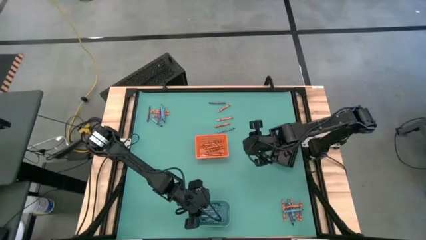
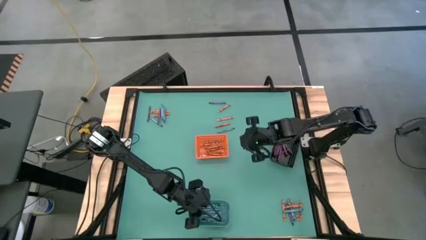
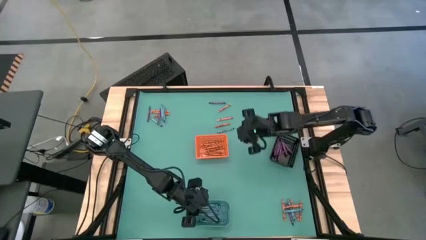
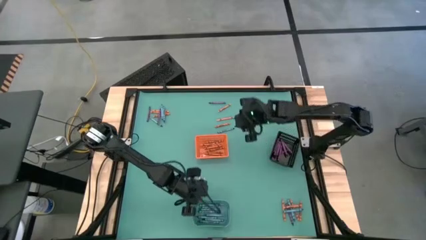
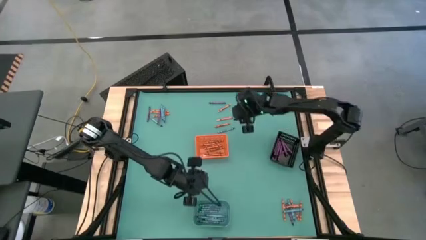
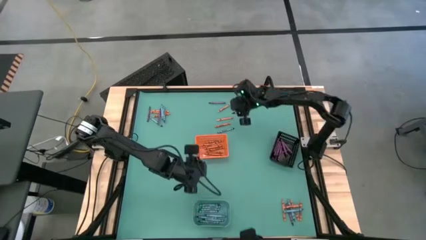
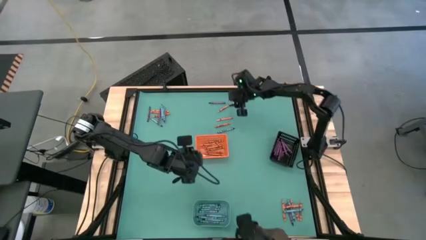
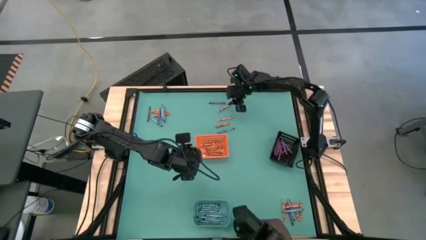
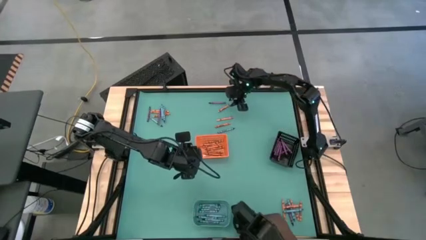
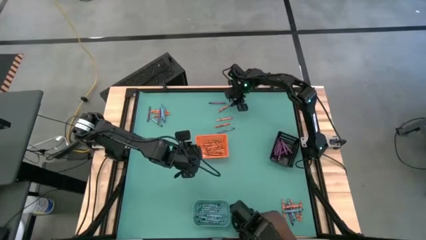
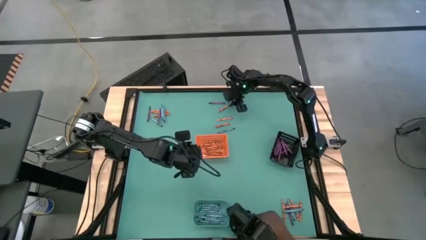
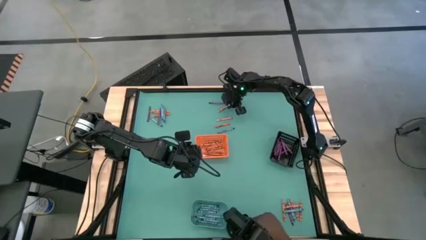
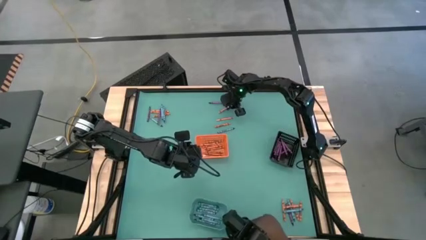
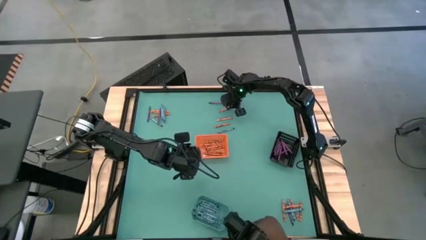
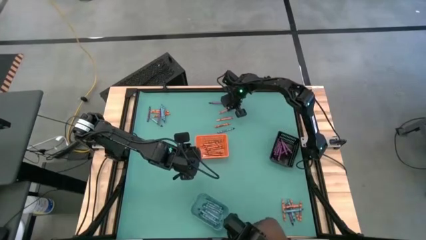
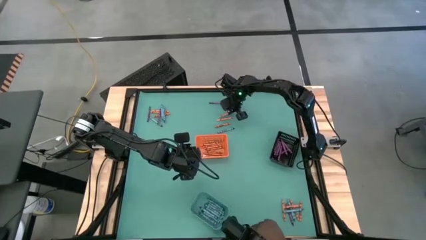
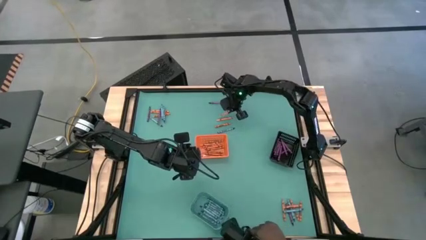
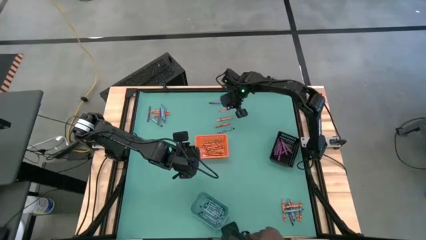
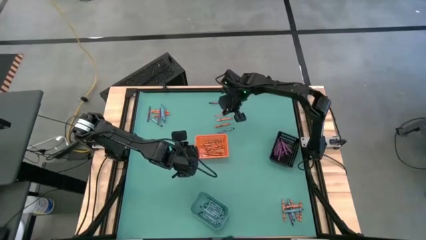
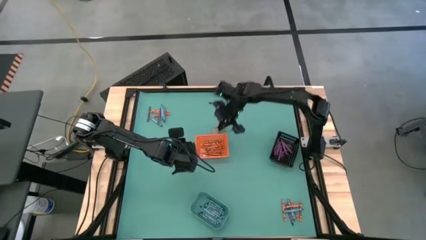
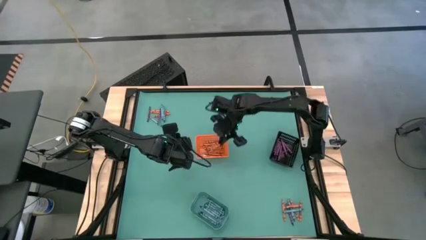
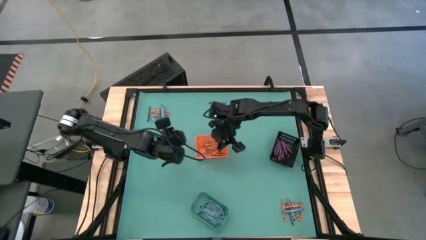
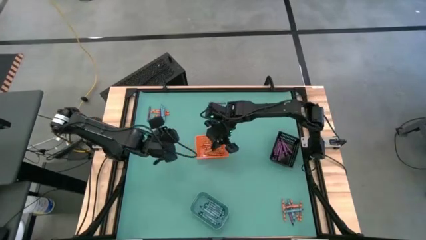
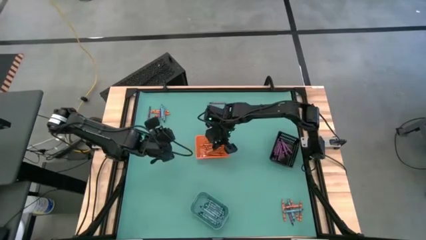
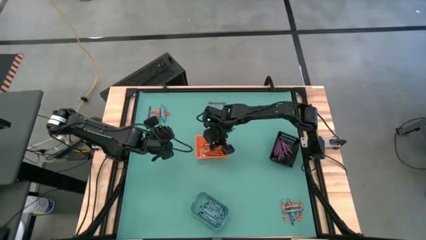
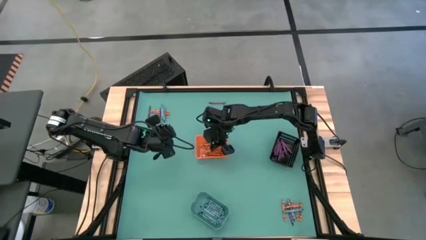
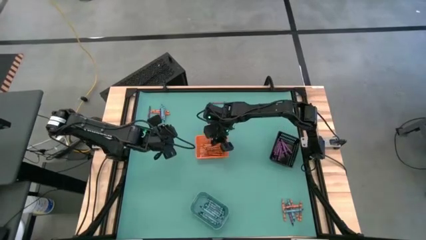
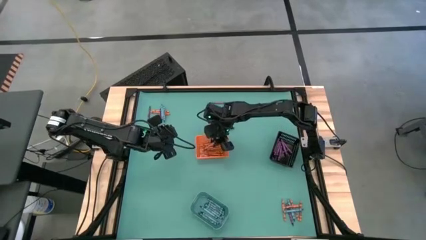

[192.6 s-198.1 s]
Task: Sort crayons
Put the orange crayon into the orange bin

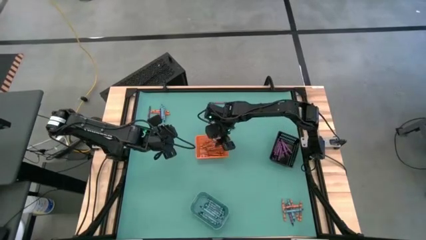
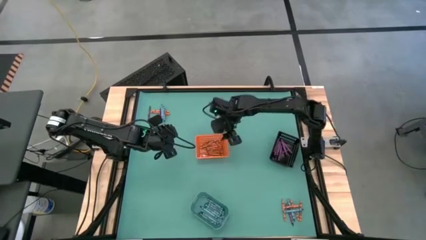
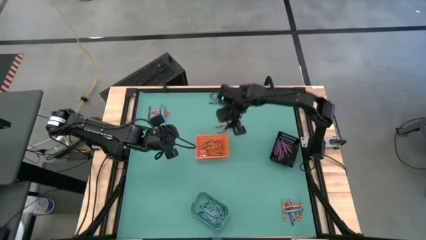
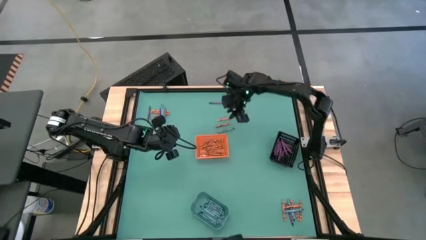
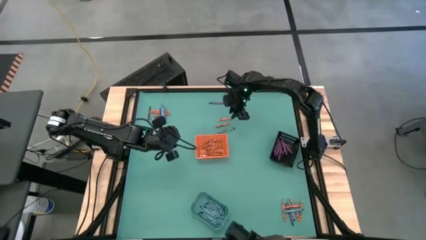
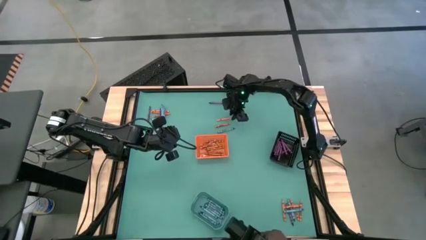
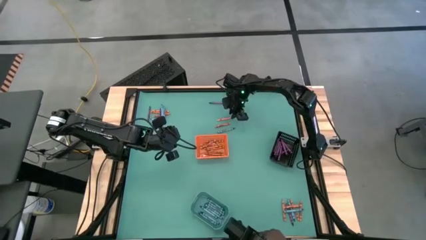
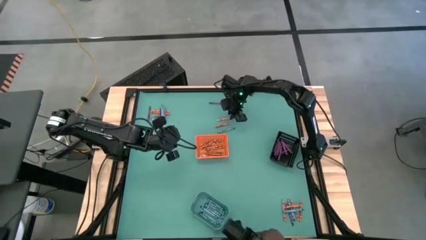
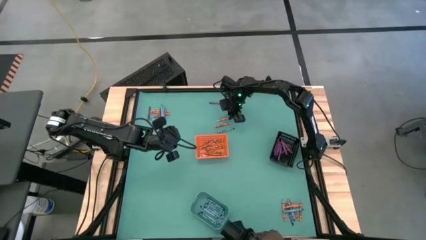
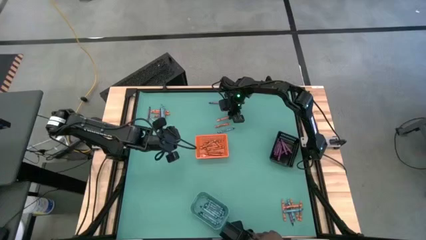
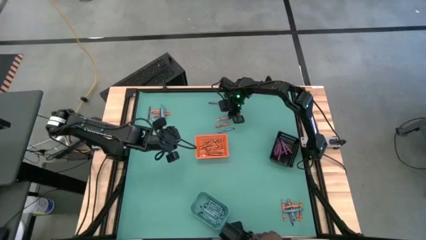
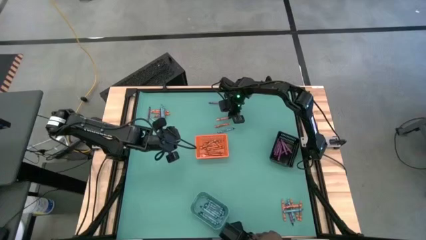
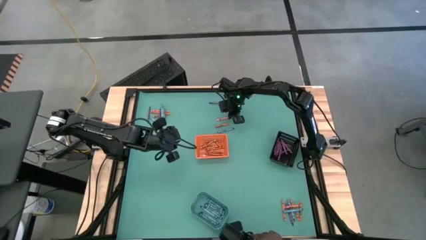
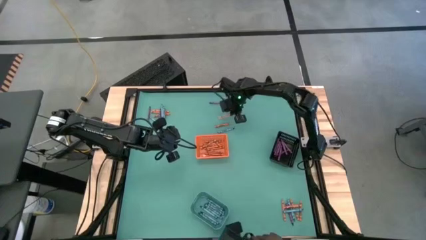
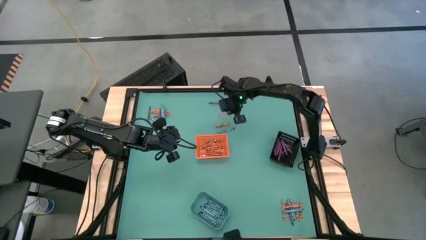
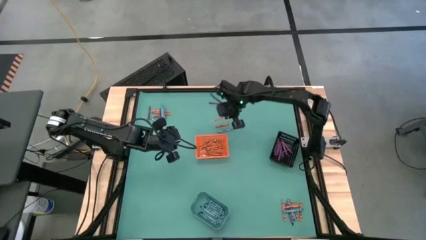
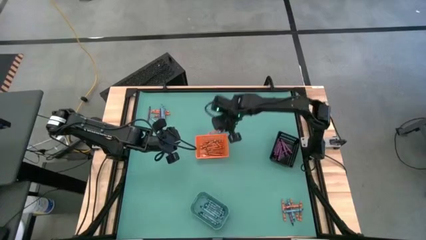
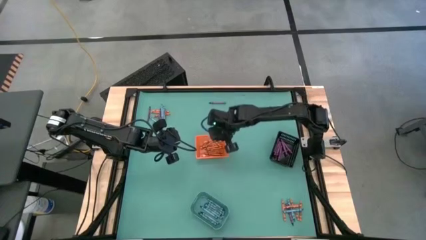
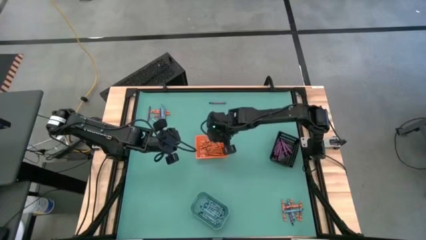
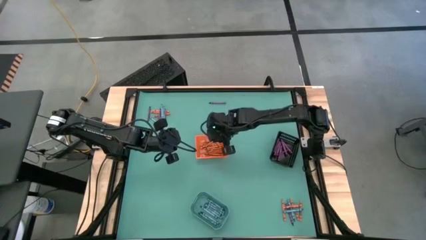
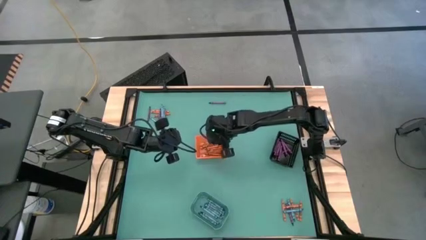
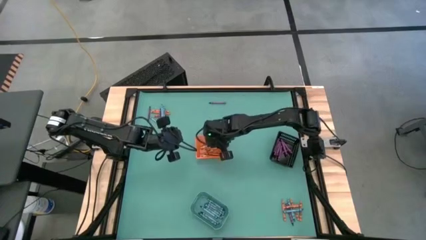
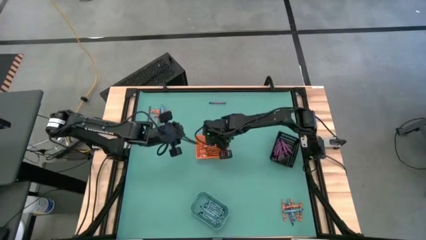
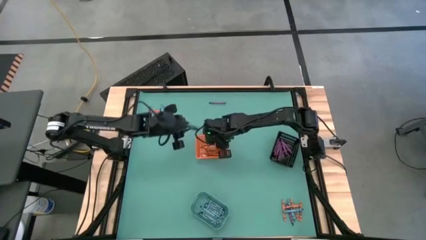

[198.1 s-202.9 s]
Put the orange crayon into the orange bin

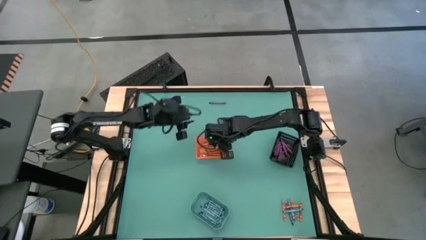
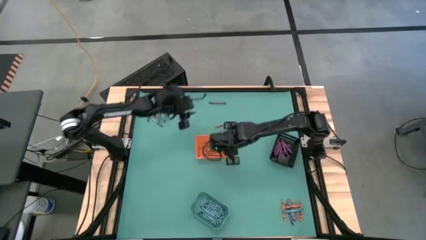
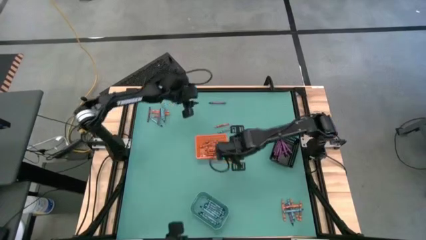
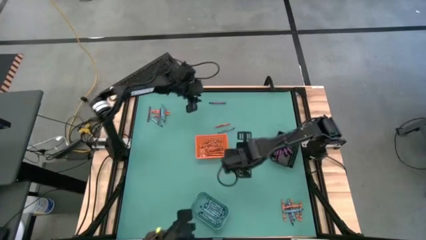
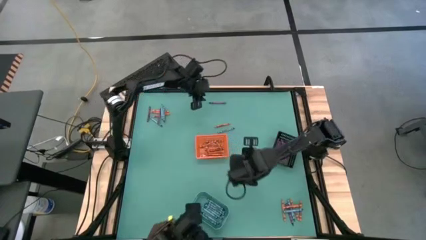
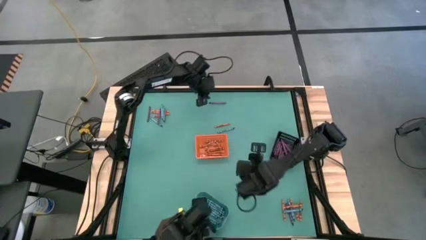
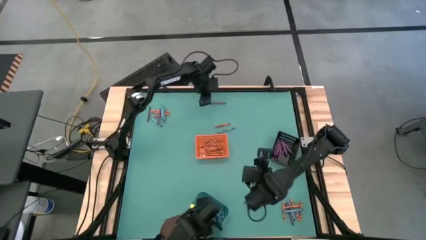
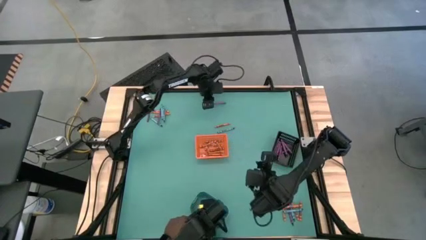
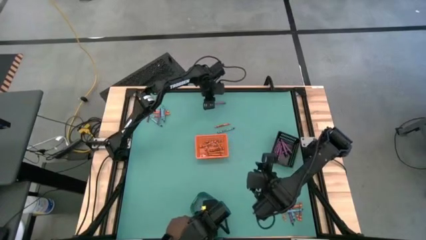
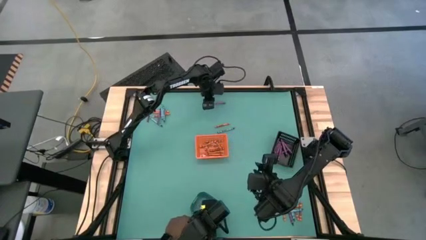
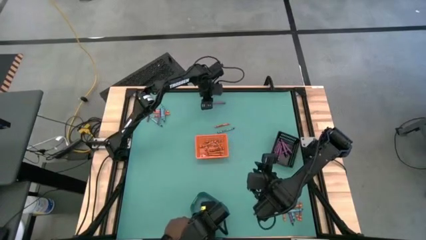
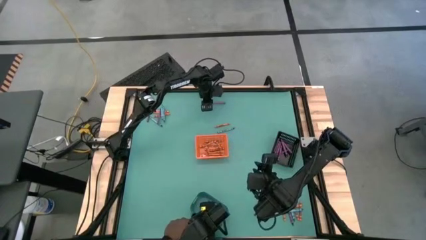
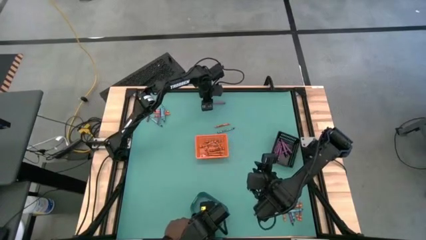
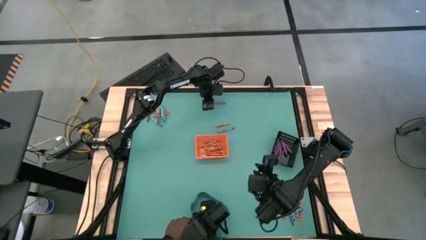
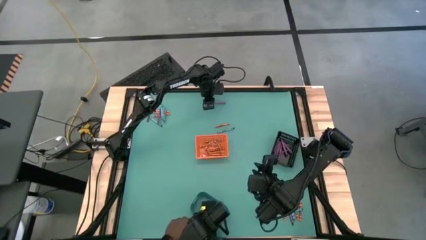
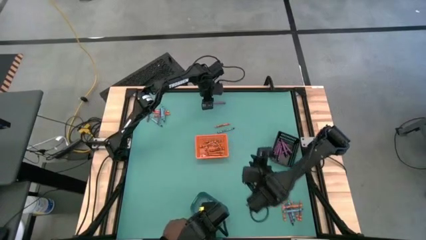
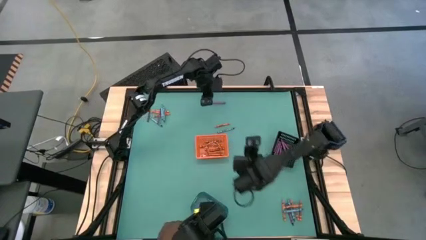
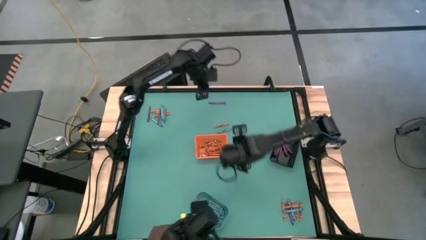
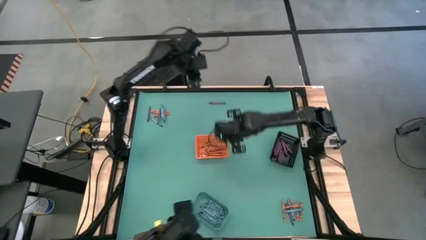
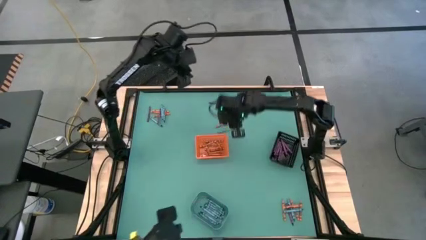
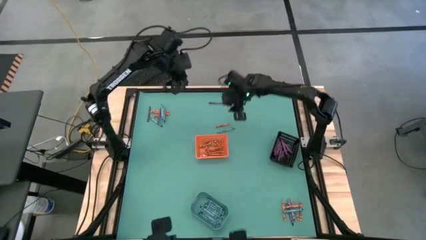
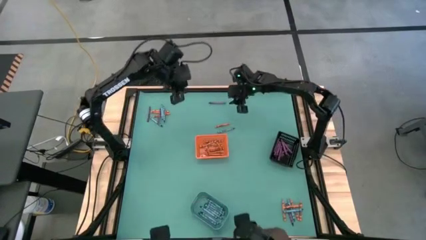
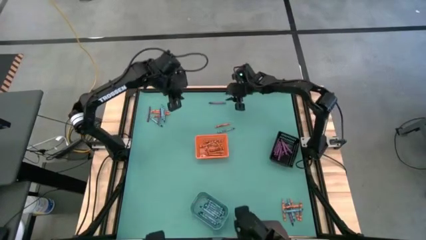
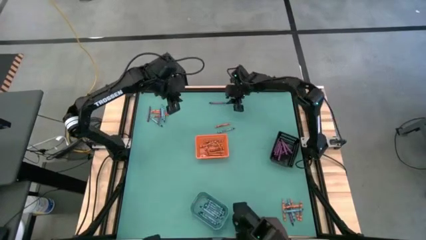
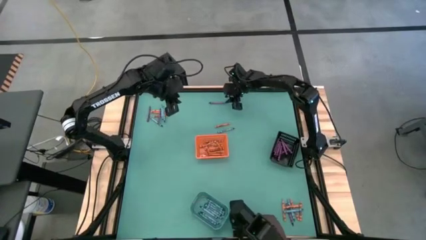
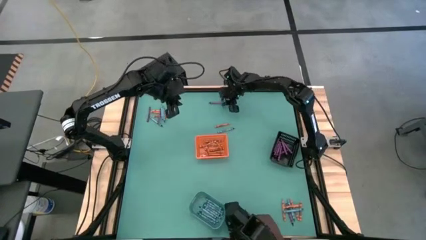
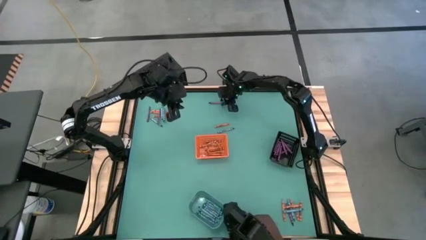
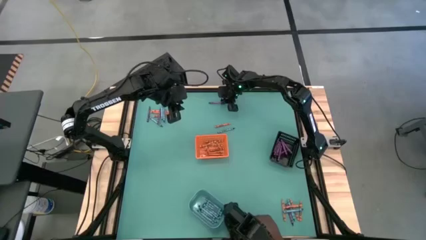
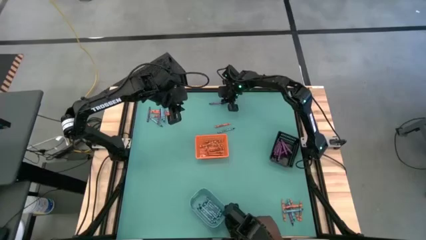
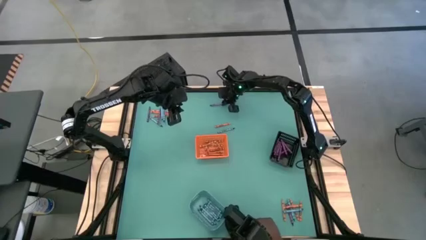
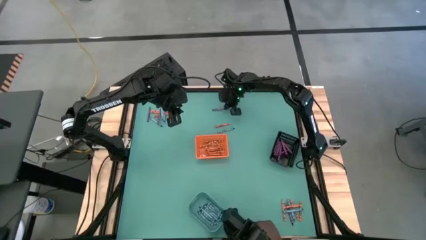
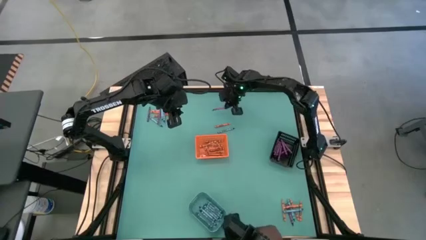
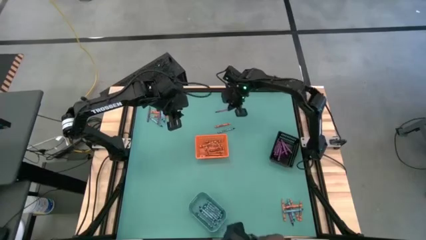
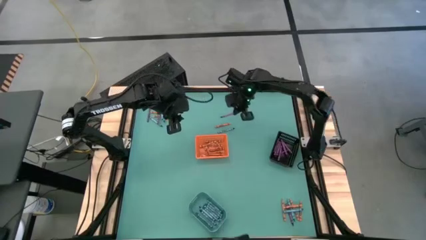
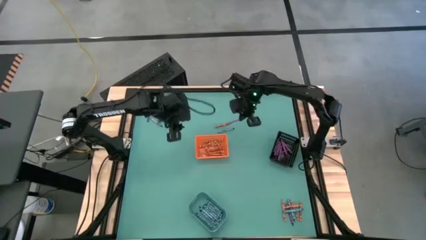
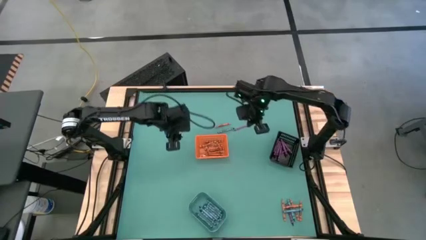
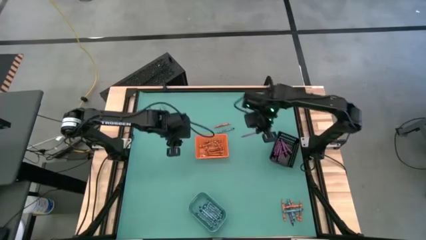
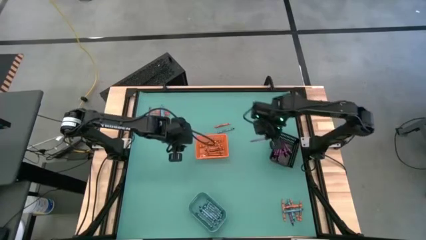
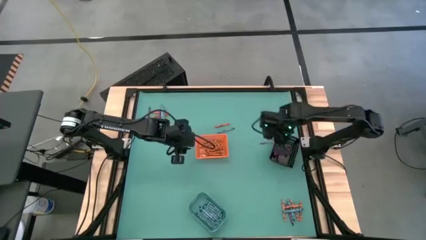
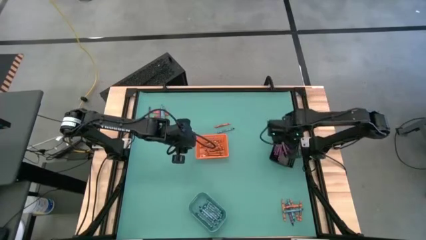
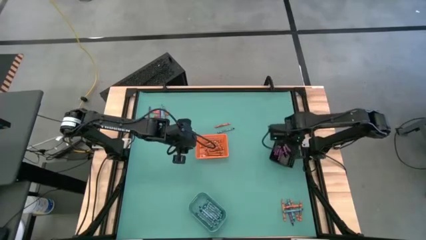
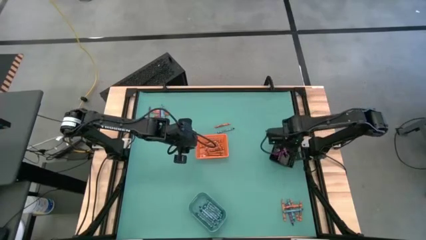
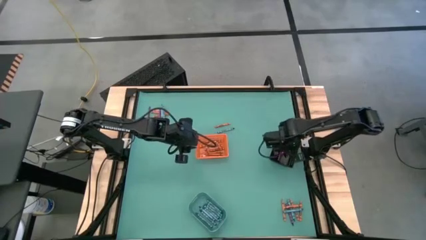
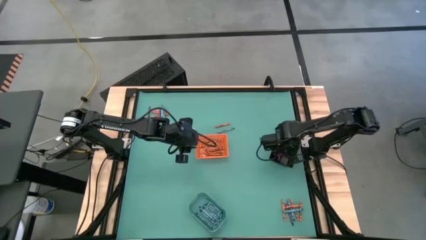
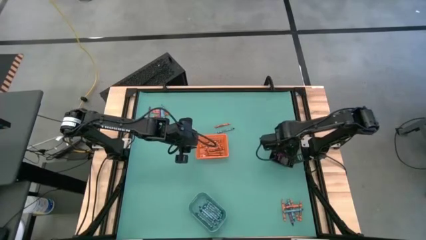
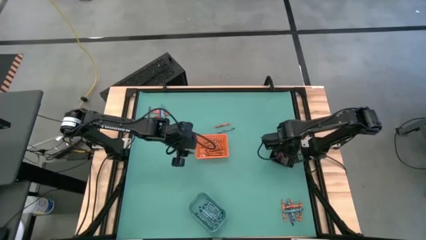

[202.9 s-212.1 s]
Put the purple crayon into the black bin
